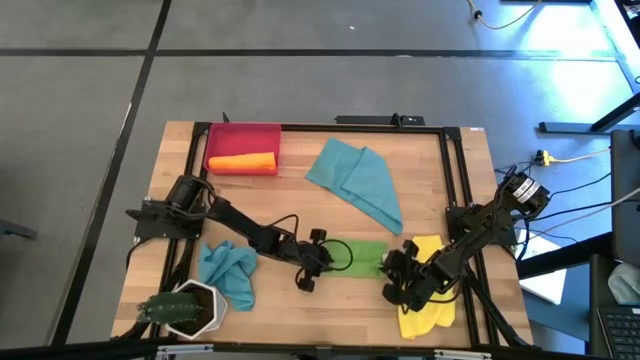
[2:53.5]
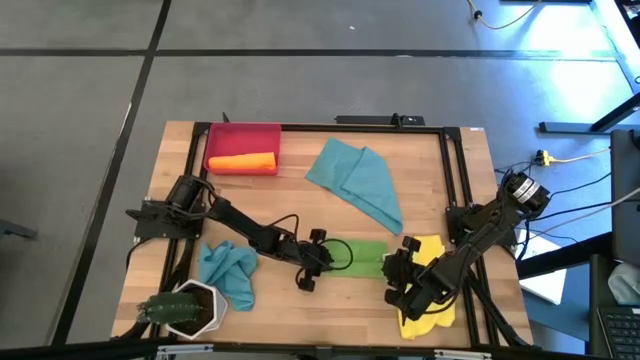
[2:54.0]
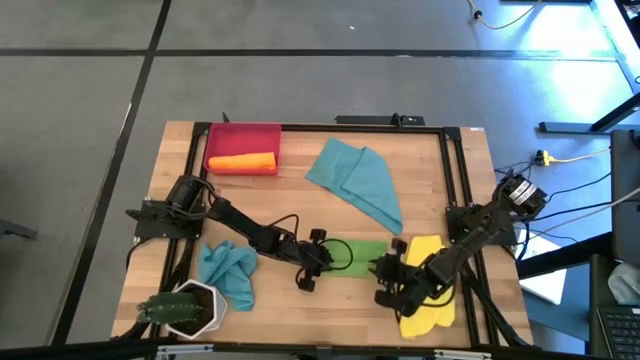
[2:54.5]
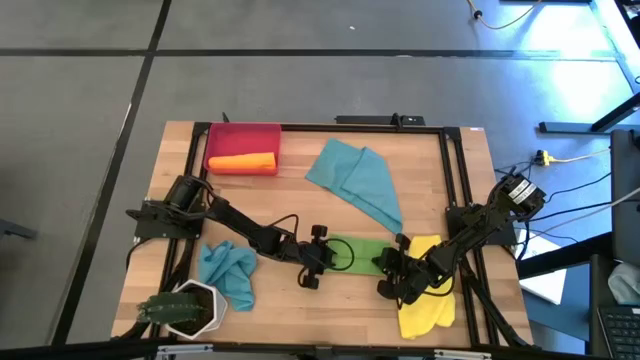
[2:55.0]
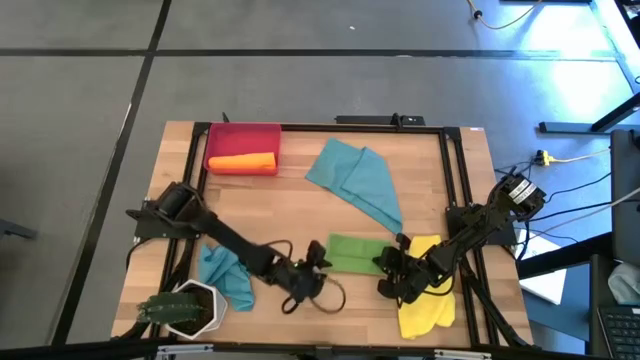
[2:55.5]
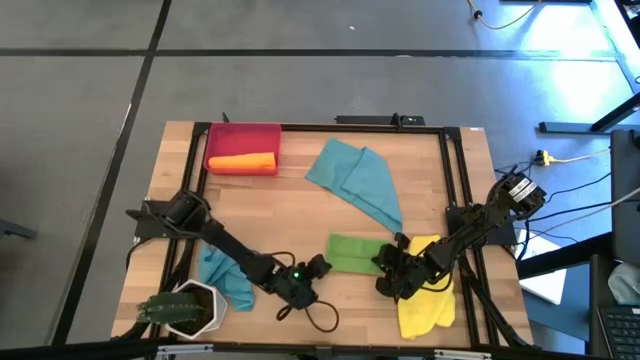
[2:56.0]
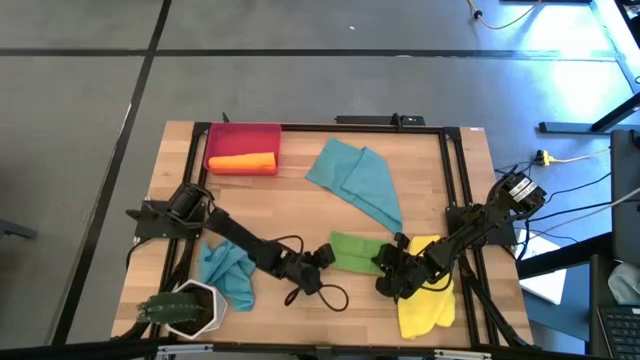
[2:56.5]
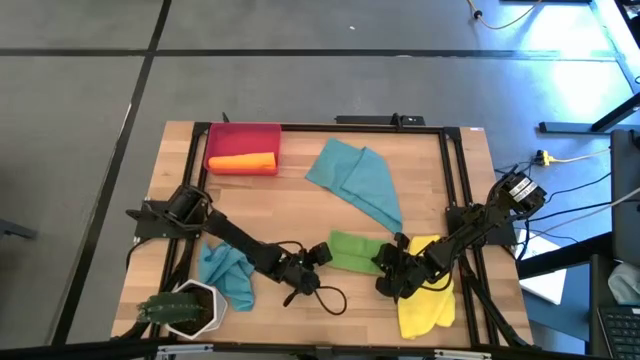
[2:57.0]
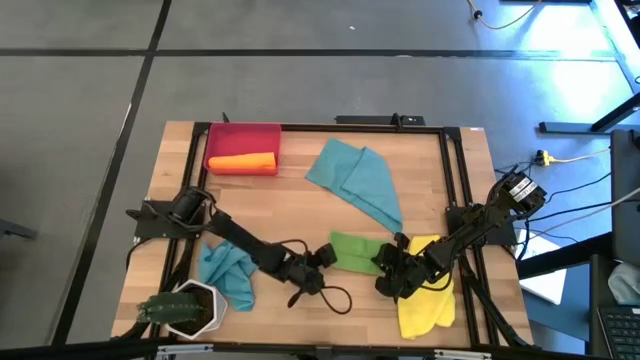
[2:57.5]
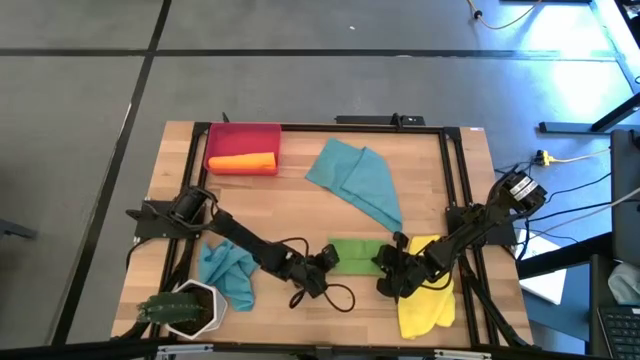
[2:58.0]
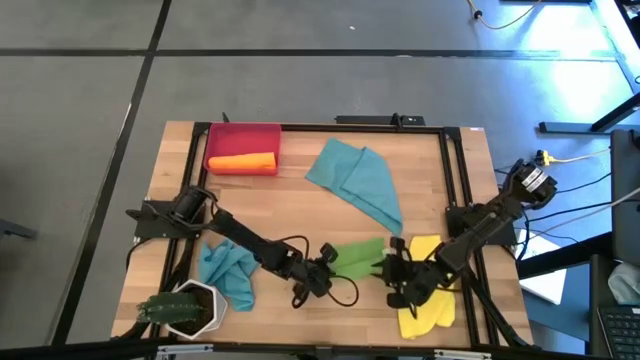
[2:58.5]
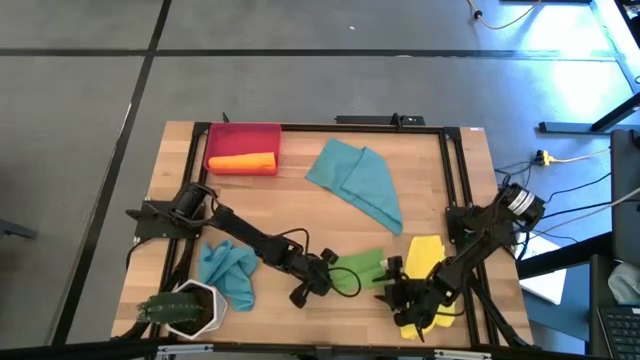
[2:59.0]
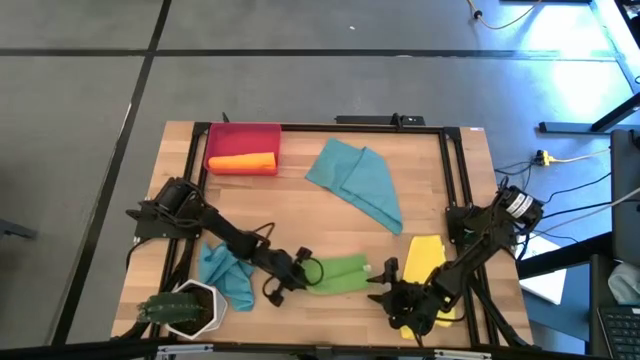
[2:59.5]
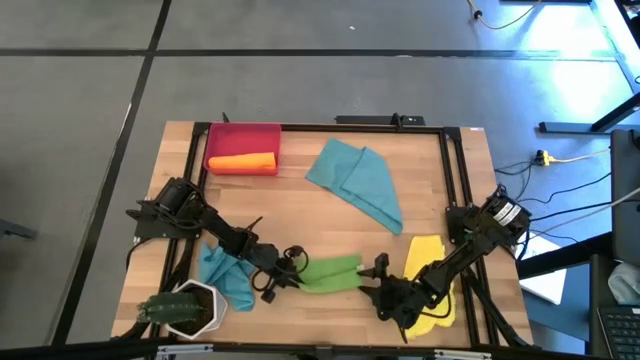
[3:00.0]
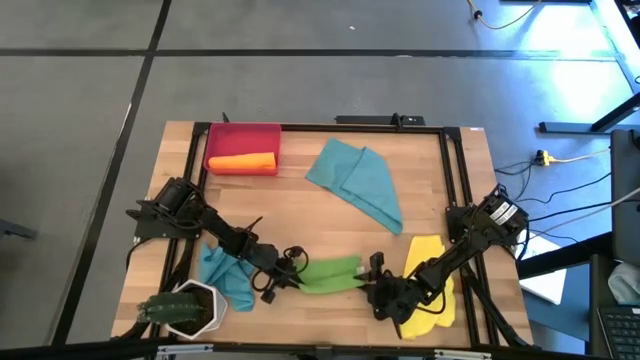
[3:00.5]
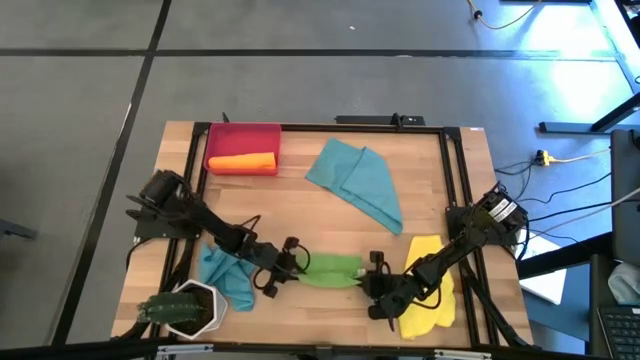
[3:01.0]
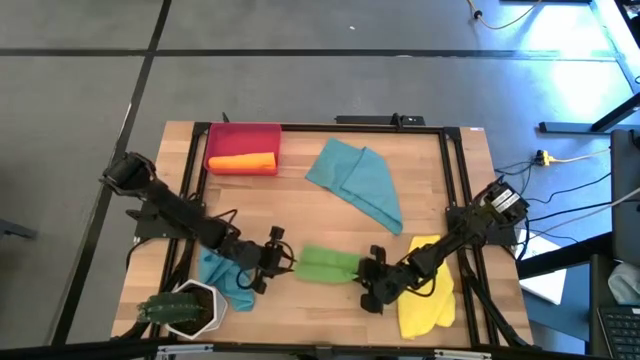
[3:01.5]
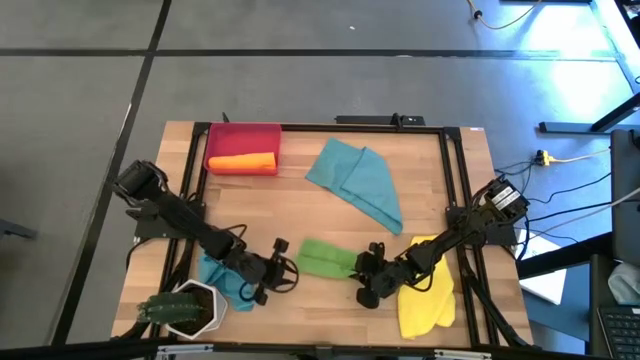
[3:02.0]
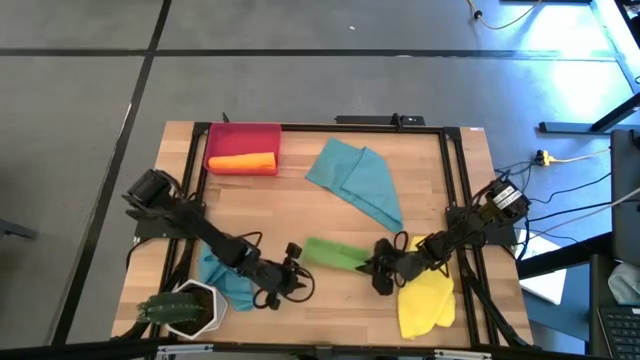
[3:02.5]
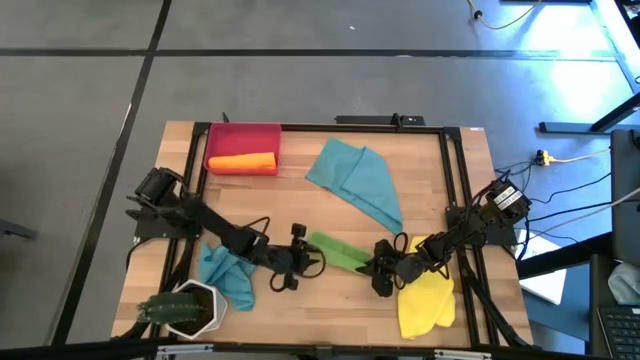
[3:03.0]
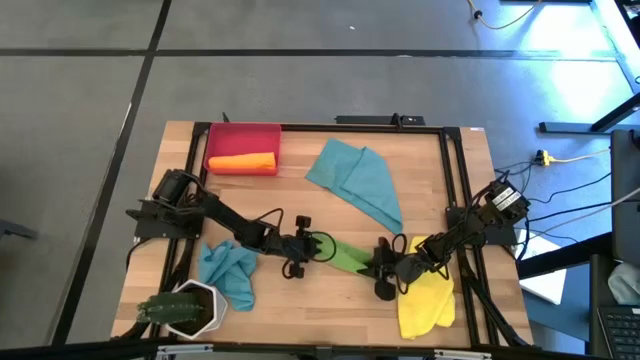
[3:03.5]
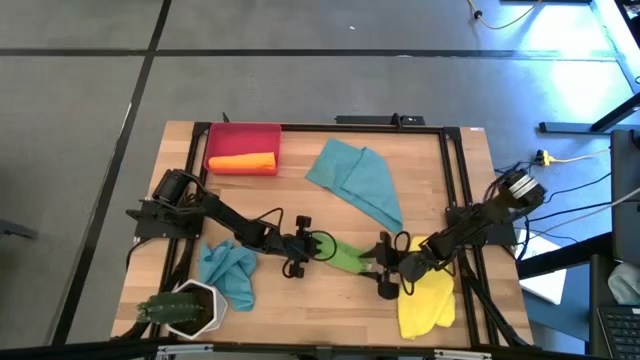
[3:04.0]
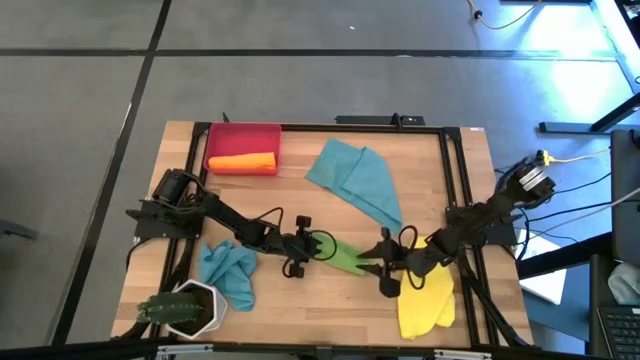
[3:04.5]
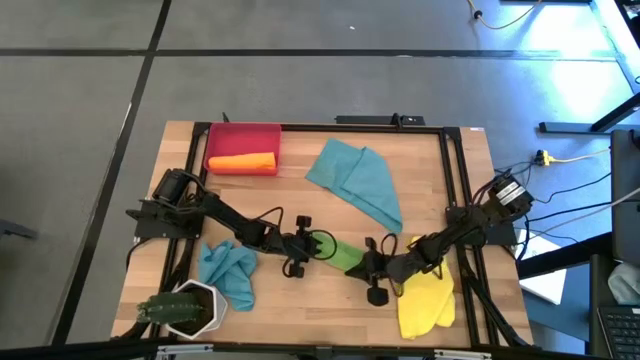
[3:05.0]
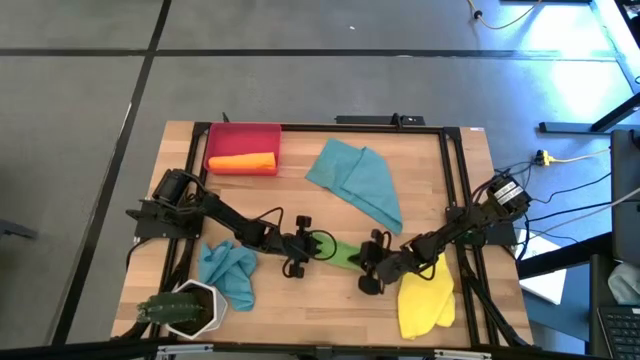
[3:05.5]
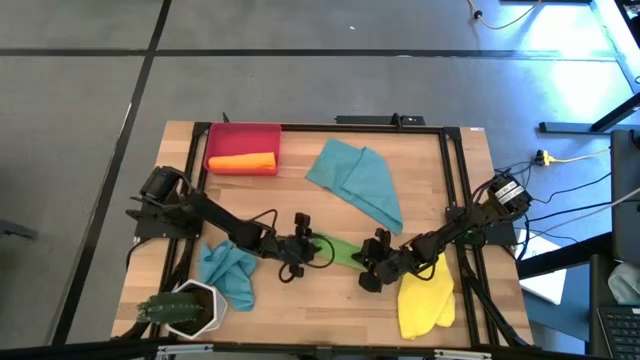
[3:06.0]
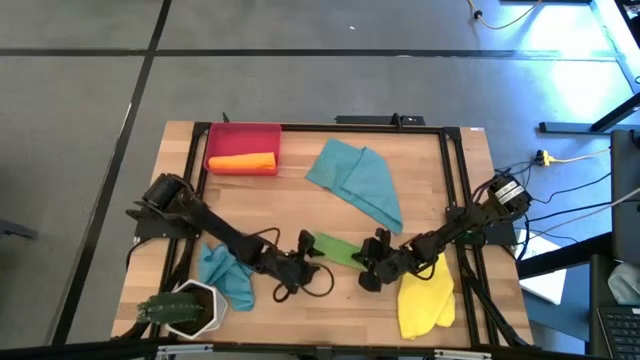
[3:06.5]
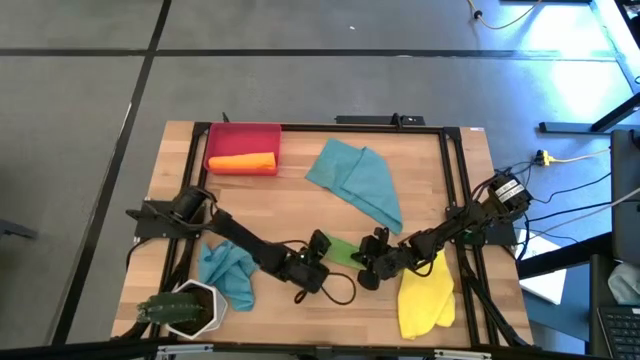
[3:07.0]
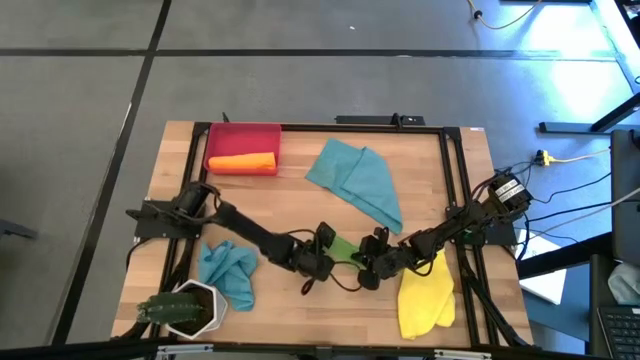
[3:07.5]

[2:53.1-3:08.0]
Task: Roll microfiber towels into tight, uniform cylinder then place into a basket
Roll the green microfiber towel

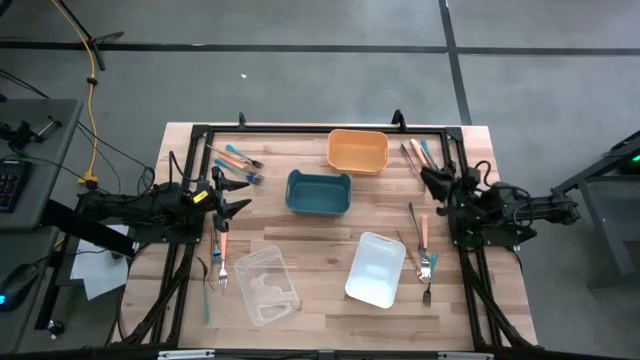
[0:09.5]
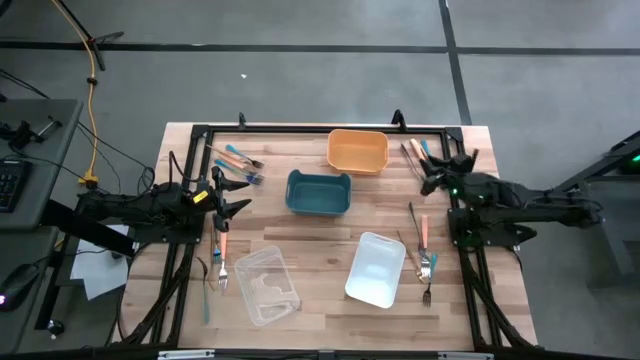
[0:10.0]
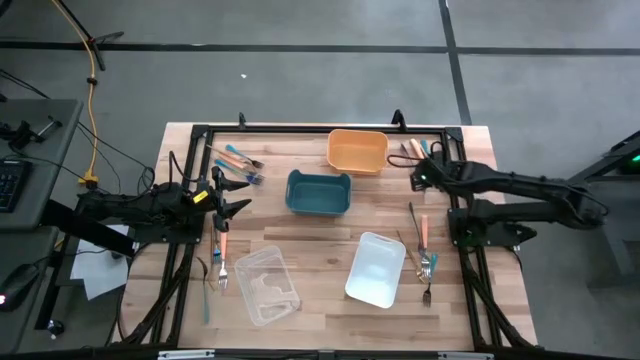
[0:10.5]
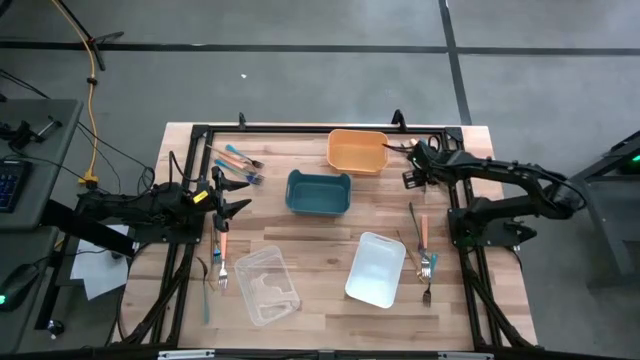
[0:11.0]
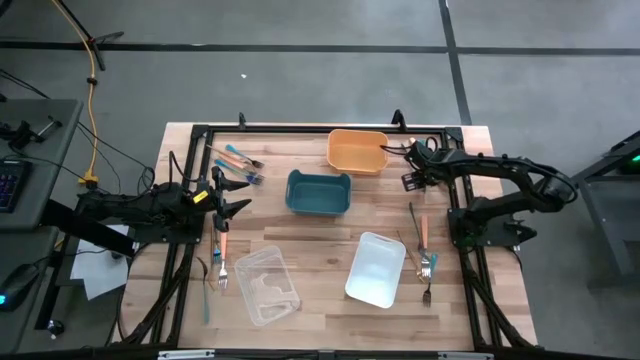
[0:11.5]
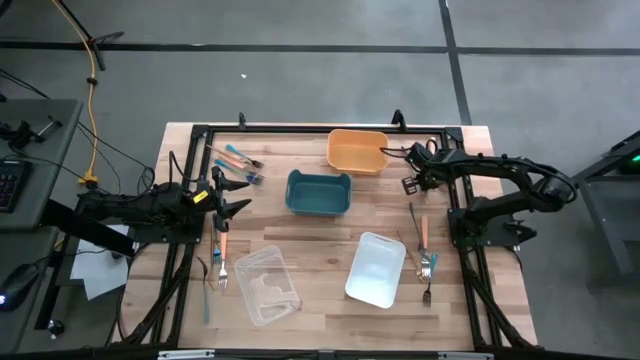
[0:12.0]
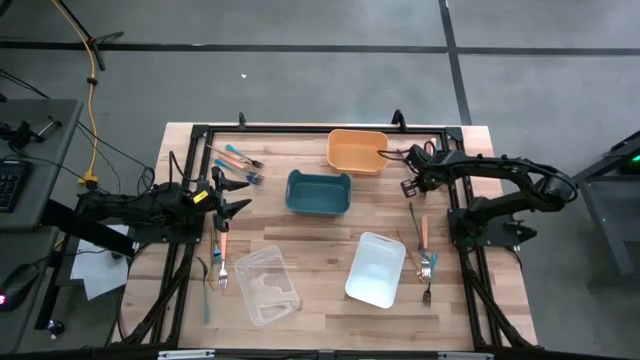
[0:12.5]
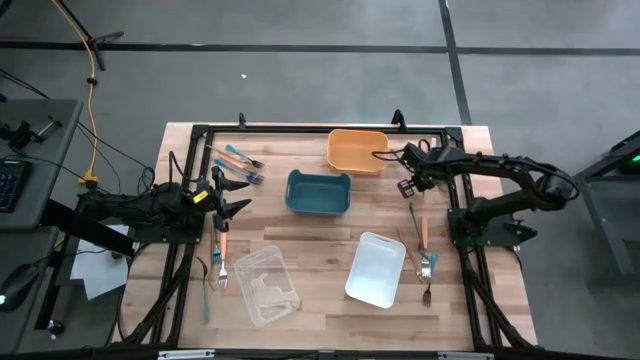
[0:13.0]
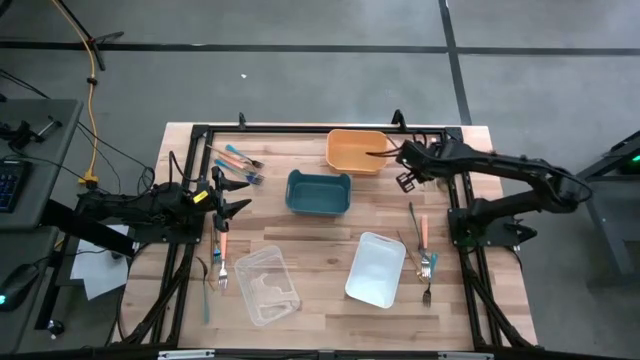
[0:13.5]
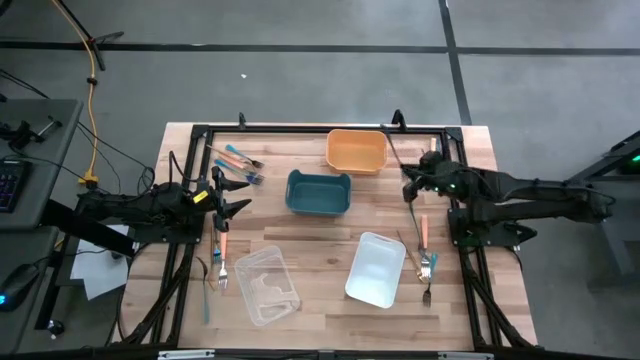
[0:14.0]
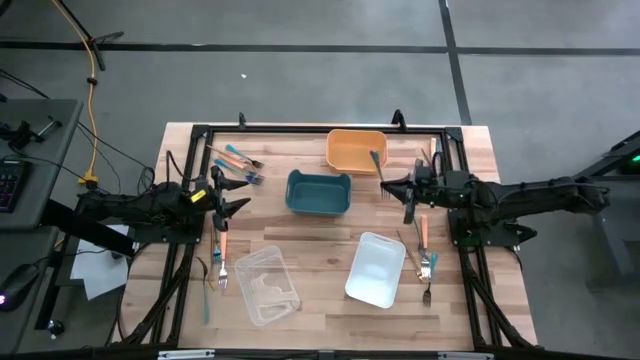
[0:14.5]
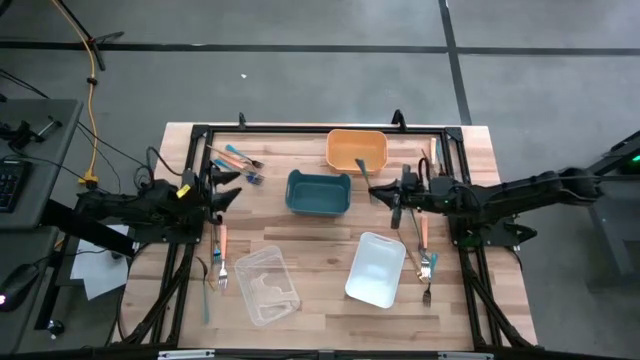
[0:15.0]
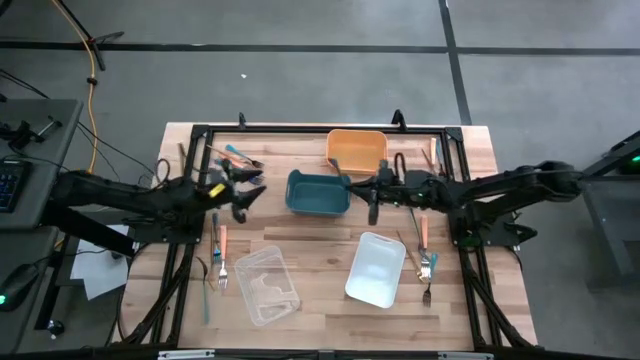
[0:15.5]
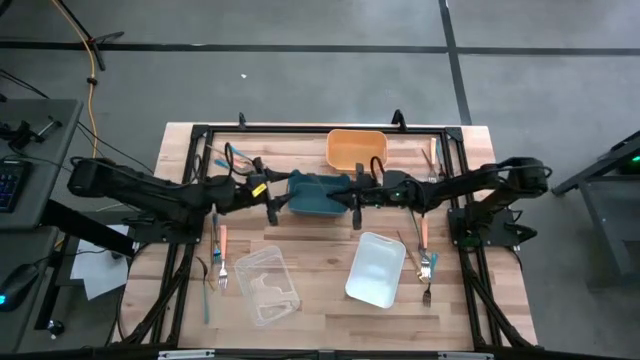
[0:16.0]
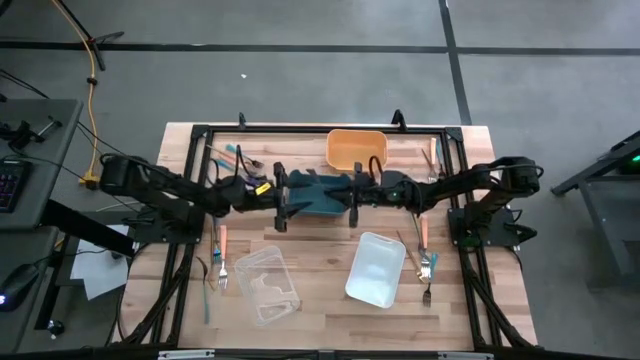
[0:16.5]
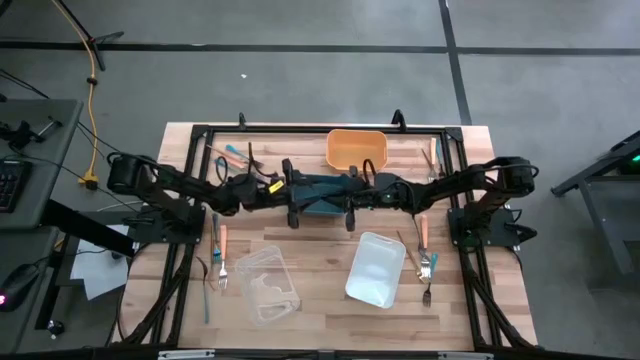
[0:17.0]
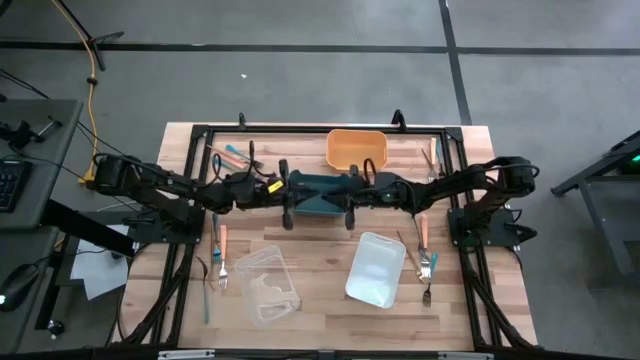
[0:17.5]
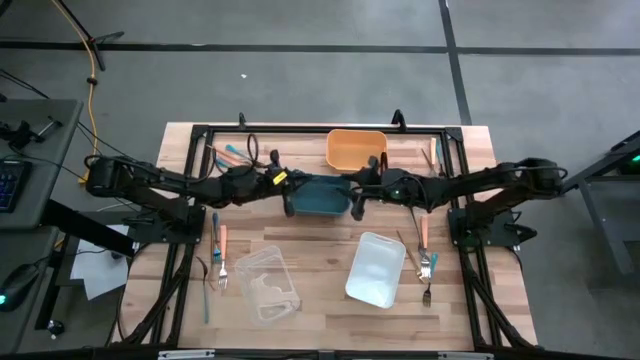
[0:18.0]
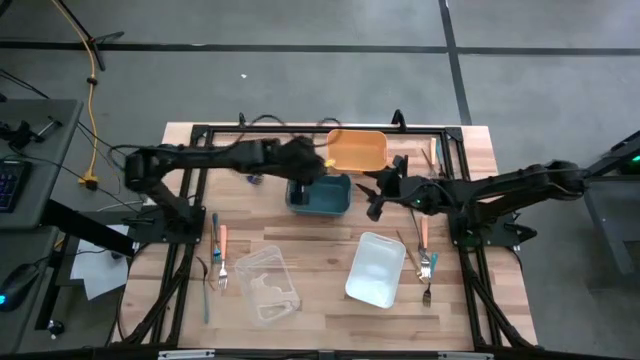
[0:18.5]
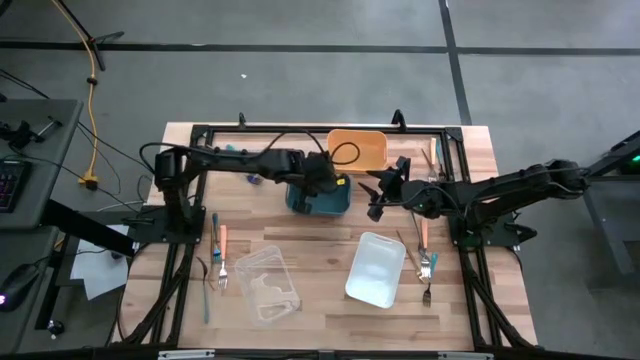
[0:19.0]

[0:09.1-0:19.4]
Task: Sort silverware by color (type)
Put the blue fork into the blue bin
